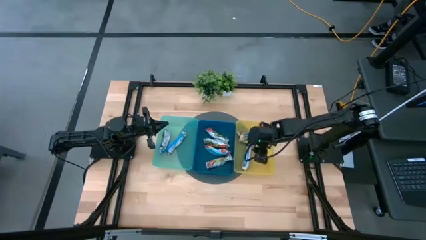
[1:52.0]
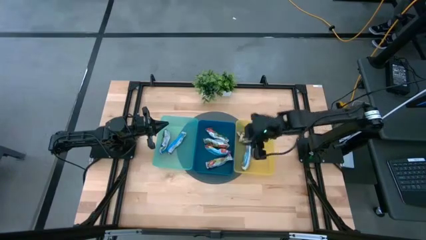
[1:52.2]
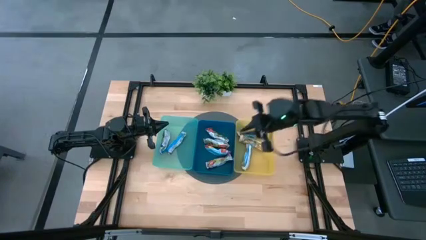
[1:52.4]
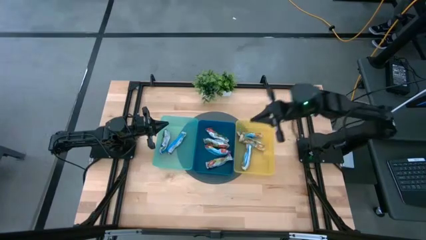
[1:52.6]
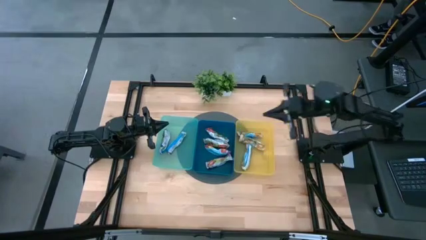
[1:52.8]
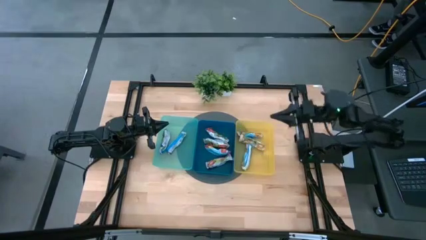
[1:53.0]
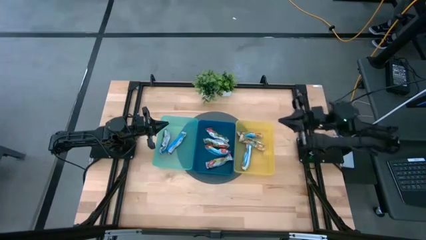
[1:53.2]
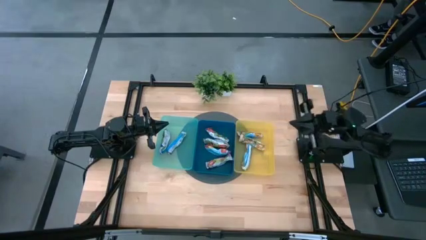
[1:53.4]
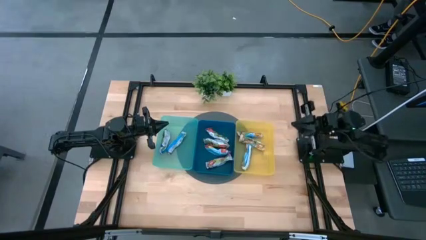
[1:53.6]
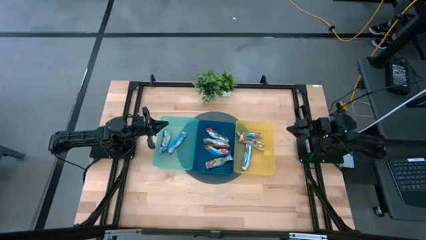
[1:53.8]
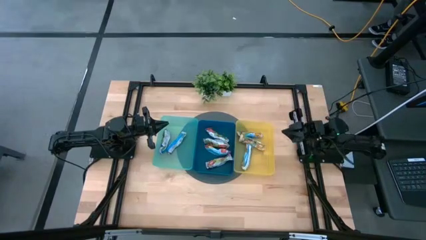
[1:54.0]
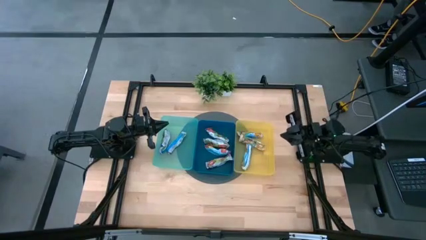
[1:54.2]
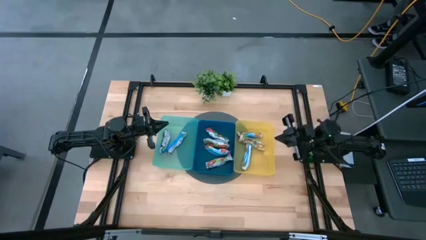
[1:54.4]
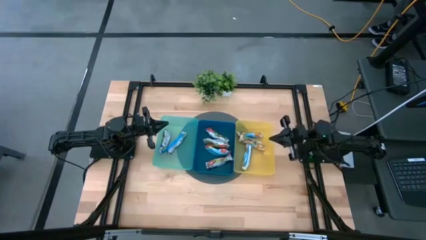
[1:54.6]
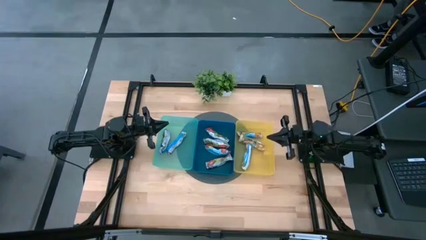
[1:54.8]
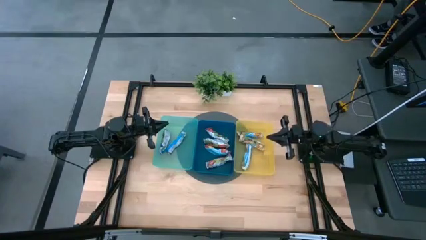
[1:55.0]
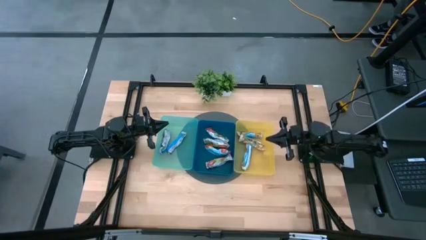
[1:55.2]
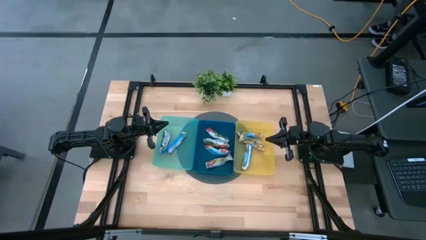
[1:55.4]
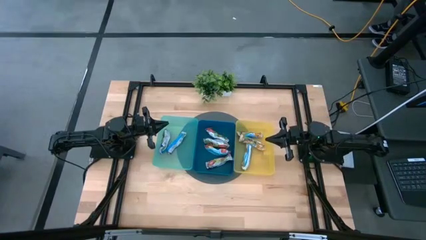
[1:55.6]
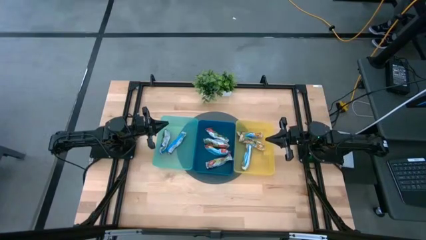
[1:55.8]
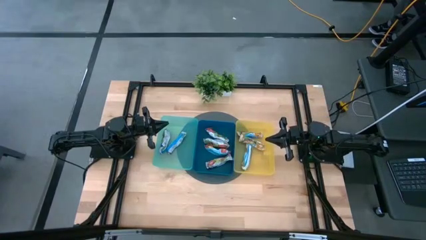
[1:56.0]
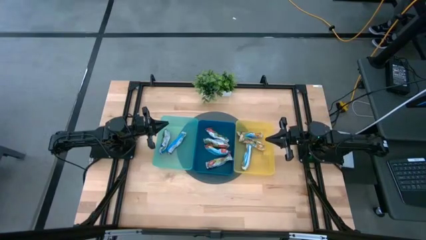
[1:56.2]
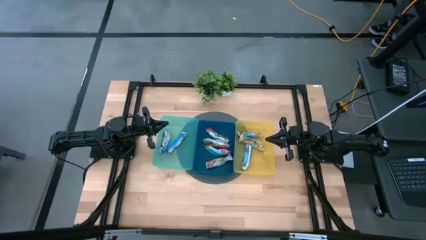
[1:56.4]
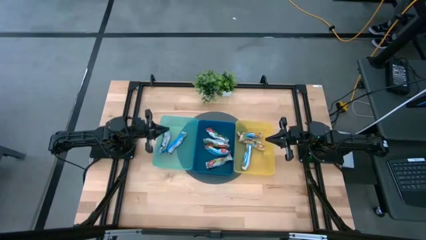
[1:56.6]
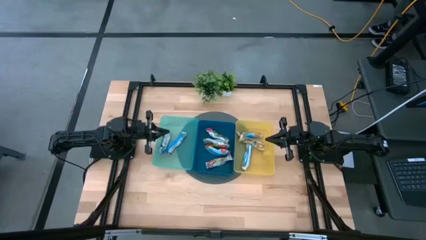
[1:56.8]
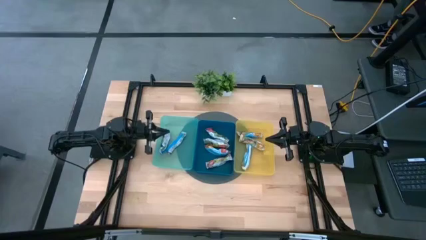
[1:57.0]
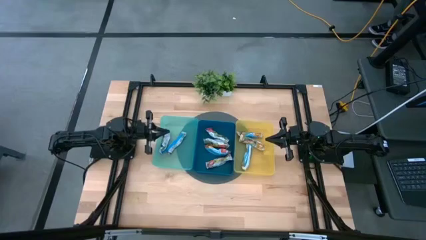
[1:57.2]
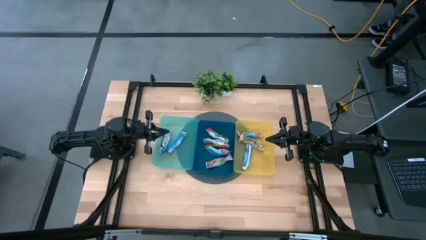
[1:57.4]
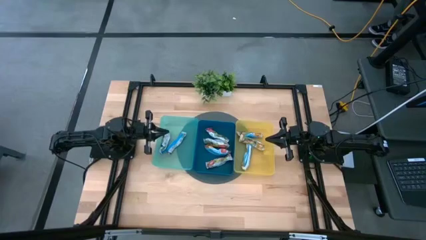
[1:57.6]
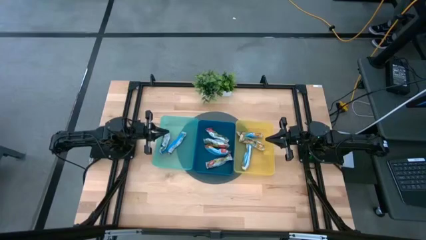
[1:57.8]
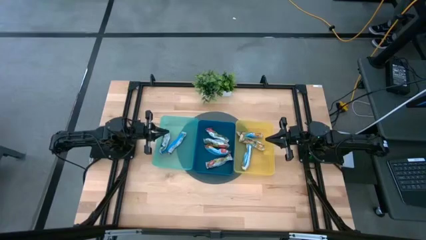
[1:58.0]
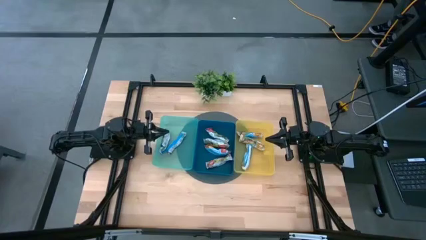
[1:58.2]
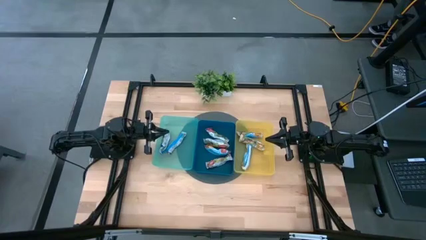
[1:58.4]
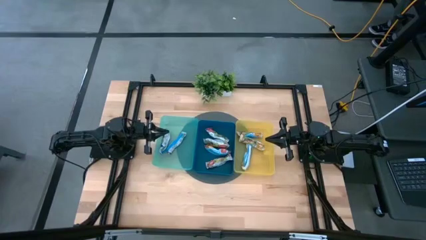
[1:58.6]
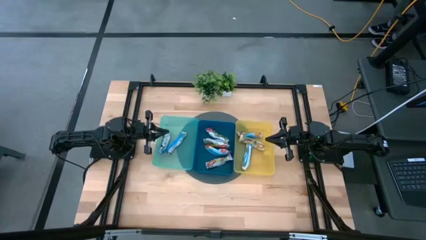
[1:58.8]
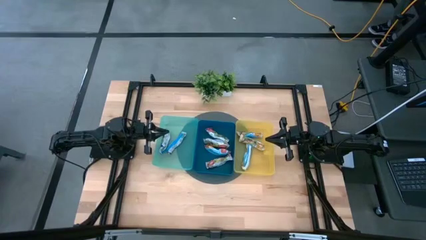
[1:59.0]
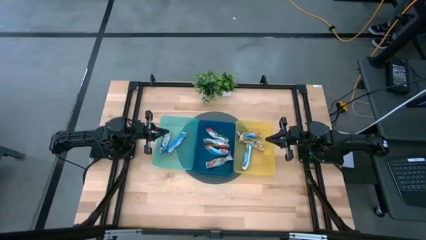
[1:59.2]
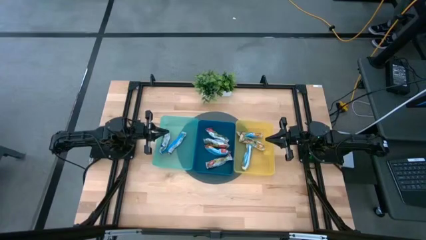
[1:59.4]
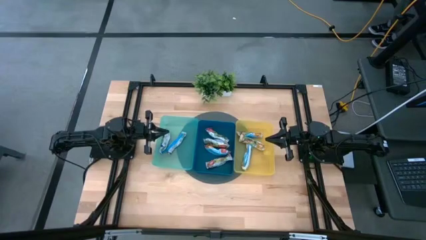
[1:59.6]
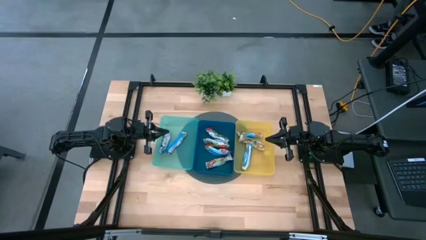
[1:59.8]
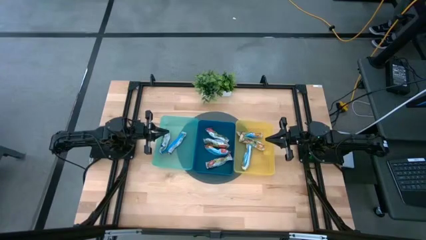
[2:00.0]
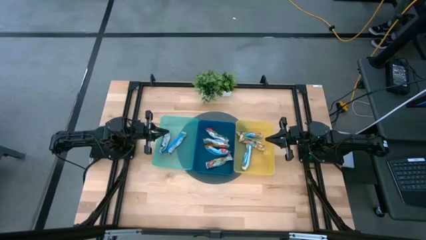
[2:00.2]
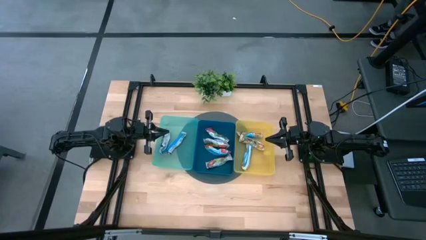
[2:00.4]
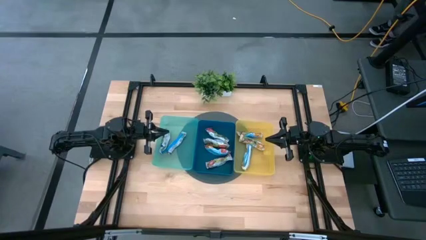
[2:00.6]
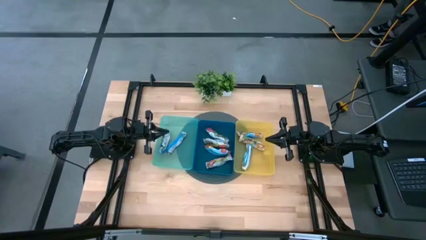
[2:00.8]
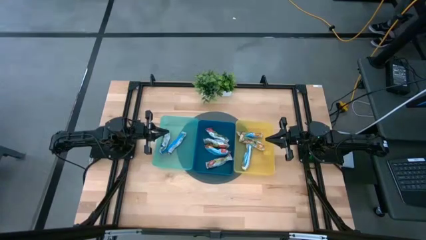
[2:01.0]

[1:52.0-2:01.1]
Task: Pick and place Granola Bars by type
Return to home position

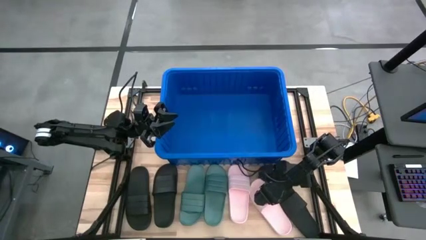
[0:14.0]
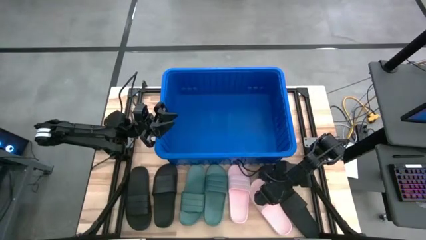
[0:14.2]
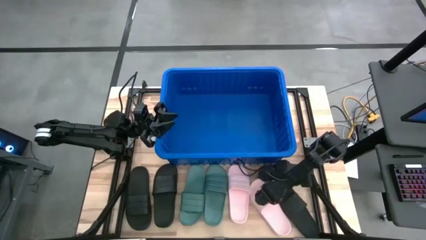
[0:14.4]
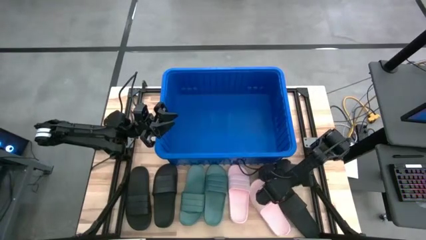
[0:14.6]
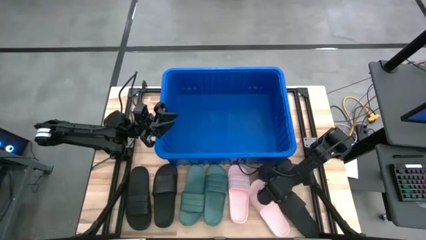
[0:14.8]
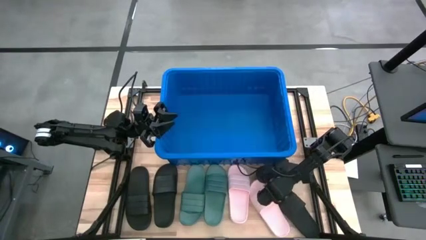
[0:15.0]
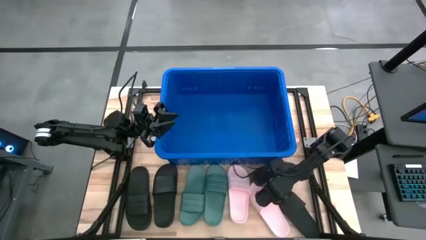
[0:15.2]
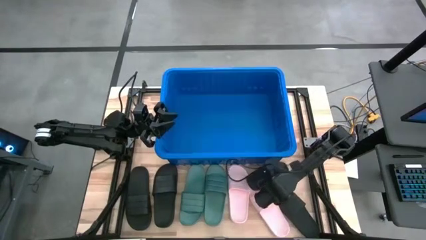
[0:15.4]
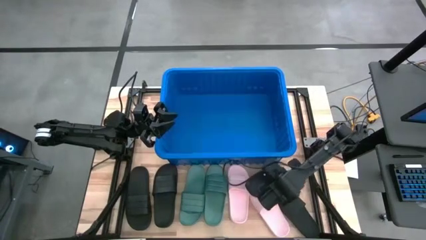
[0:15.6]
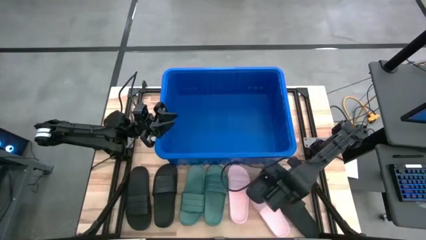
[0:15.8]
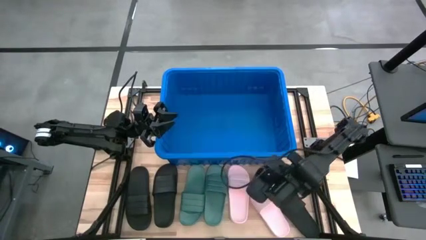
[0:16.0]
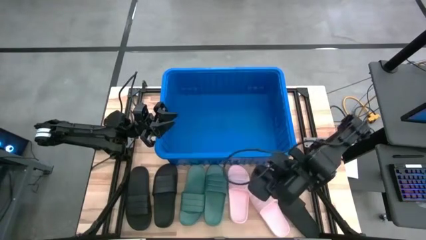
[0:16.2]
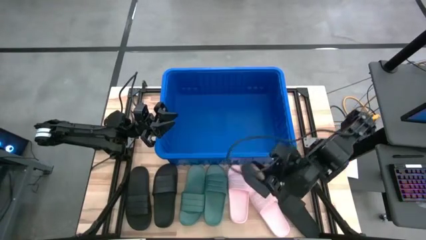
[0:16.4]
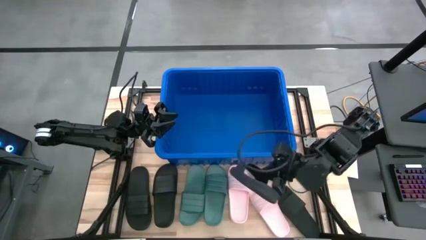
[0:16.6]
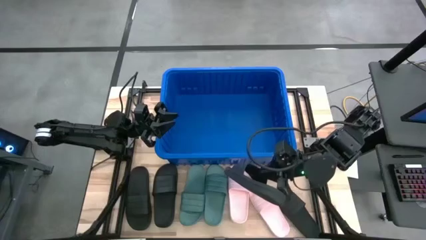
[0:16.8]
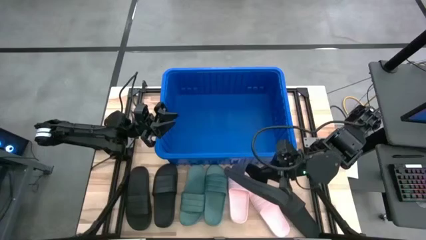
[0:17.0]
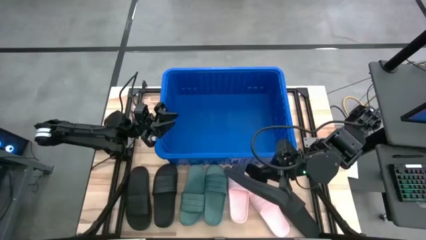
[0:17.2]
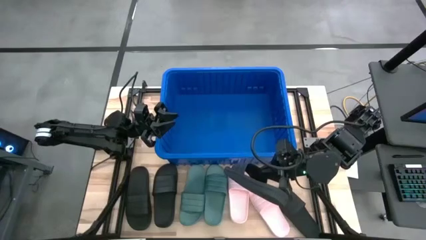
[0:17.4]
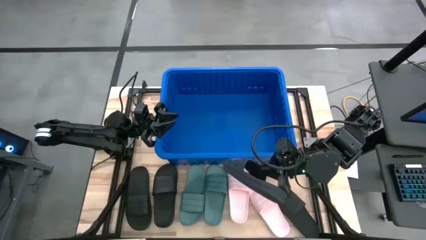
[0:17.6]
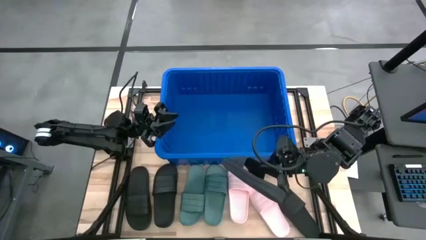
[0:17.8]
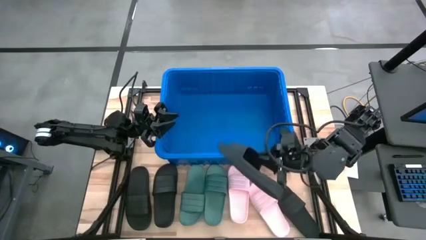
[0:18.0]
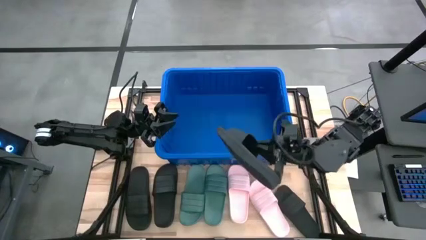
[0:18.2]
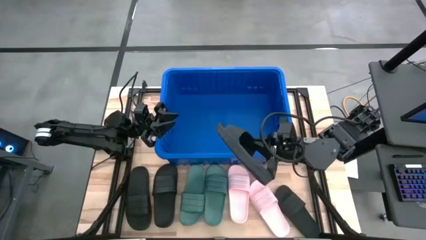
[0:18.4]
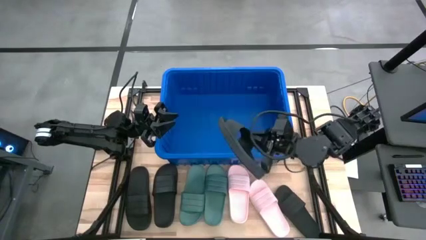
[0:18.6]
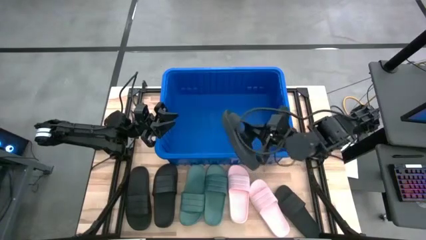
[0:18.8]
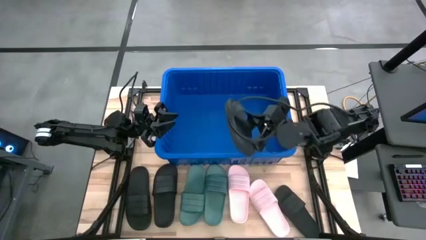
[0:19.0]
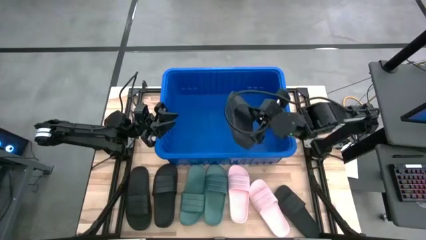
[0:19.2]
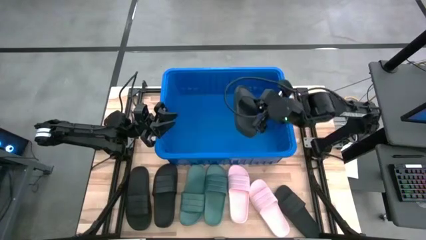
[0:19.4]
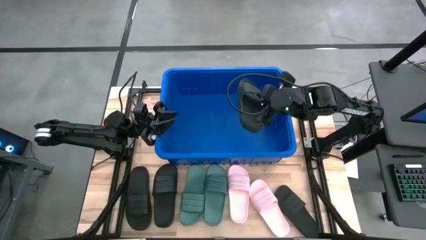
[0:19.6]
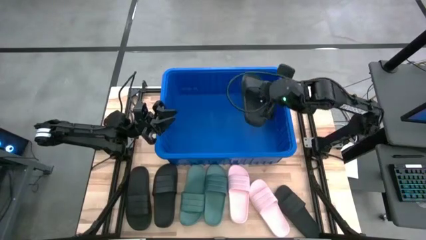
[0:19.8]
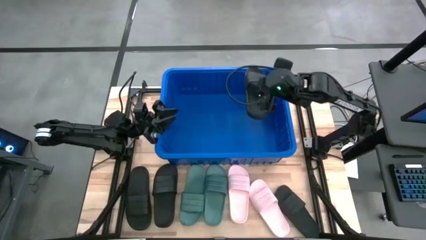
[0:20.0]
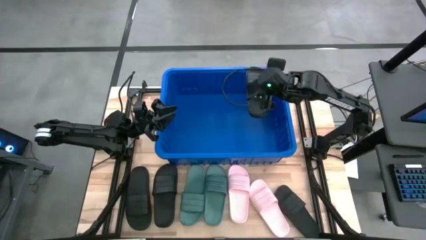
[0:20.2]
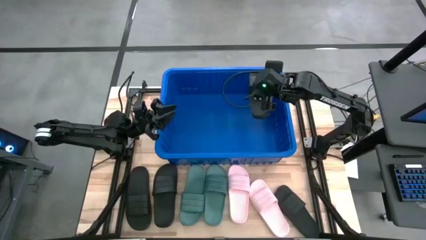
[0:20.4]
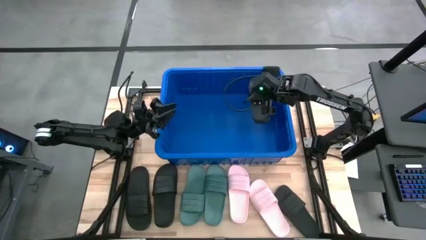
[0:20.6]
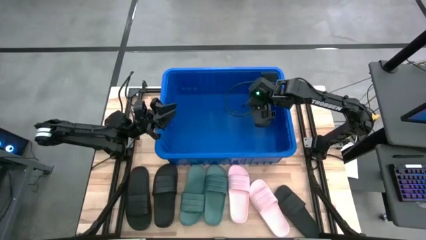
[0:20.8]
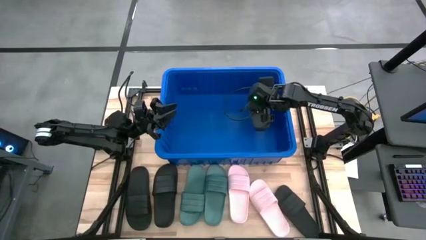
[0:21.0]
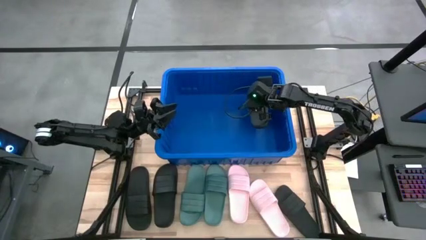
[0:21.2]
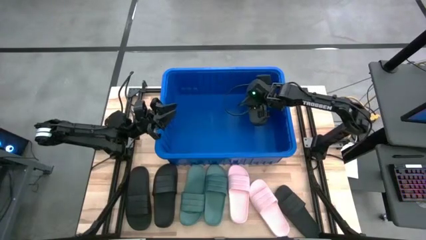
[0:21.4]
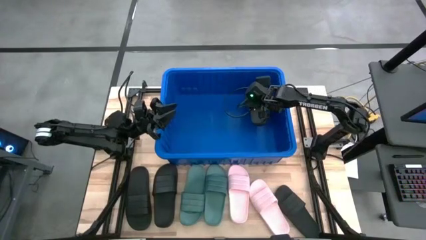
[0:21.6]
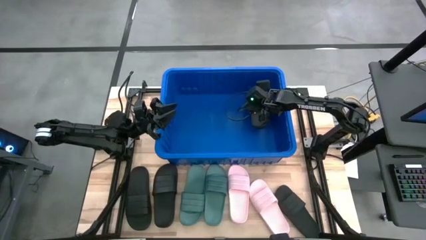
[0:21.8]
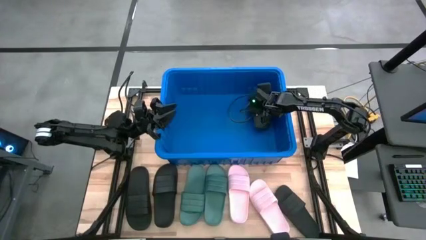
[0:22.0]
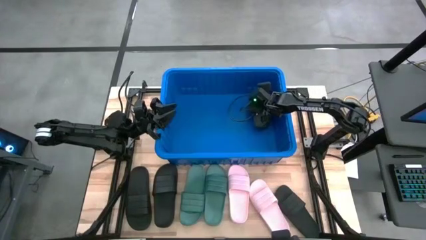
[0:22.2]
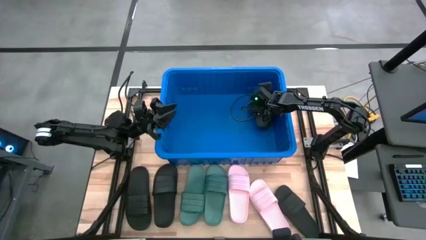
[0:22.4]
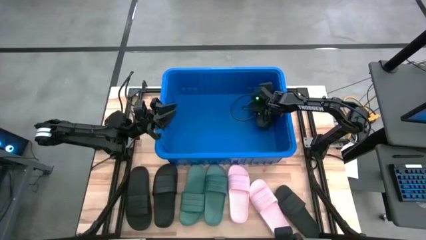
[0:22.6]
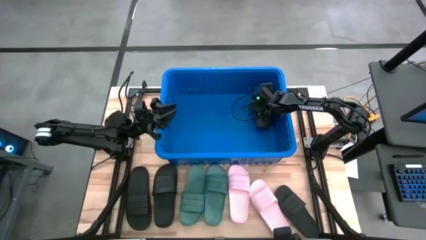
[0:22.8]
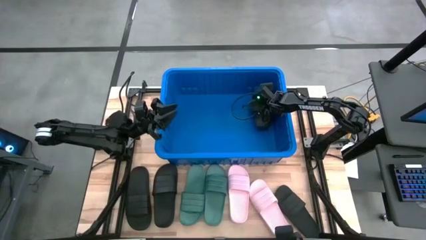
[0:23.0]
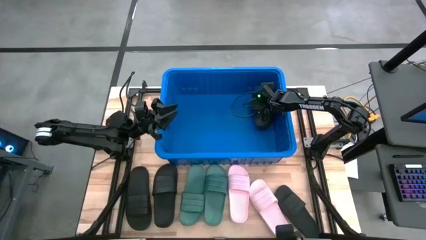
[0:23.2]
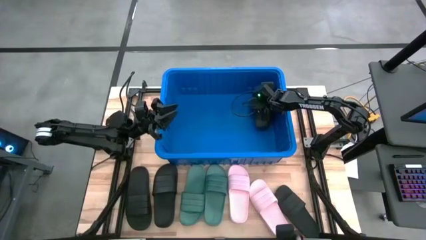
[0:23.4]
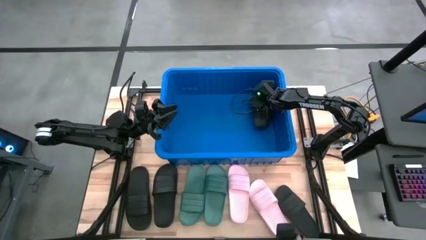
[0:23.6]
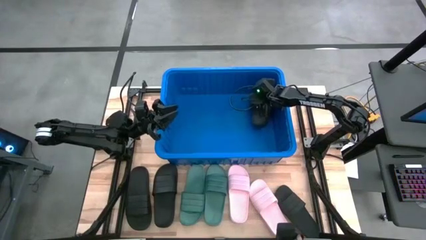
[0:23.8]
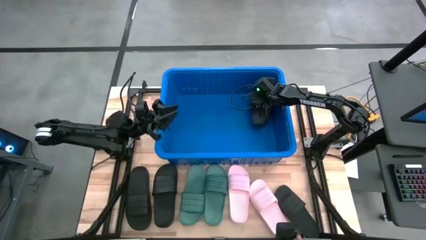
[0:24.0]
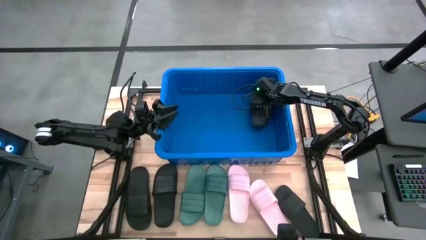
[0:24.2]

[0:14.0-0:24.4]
Task: Pick and place slides into bin
Put the black slipper into the blue bin
